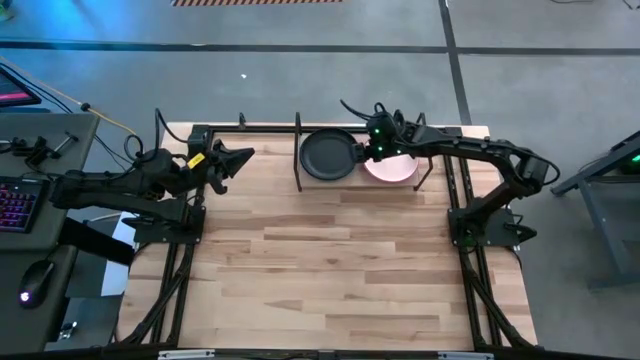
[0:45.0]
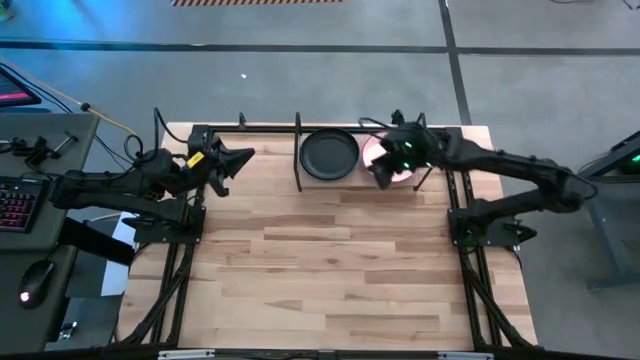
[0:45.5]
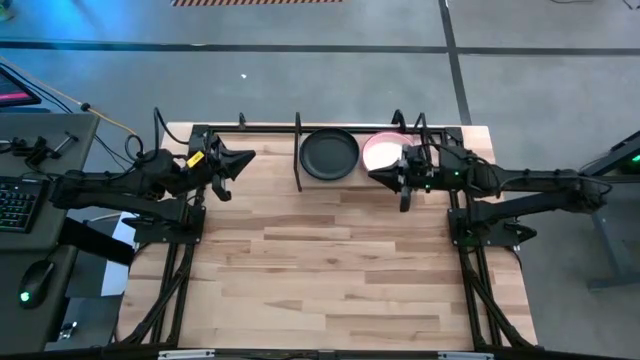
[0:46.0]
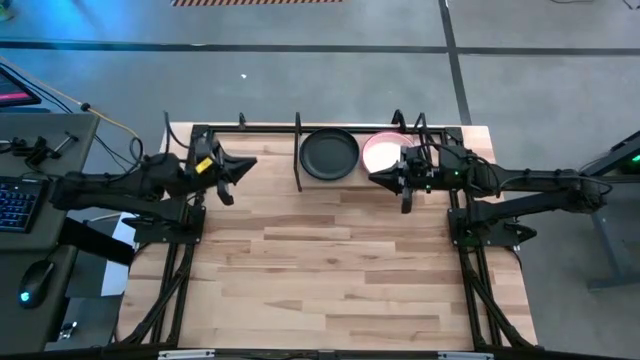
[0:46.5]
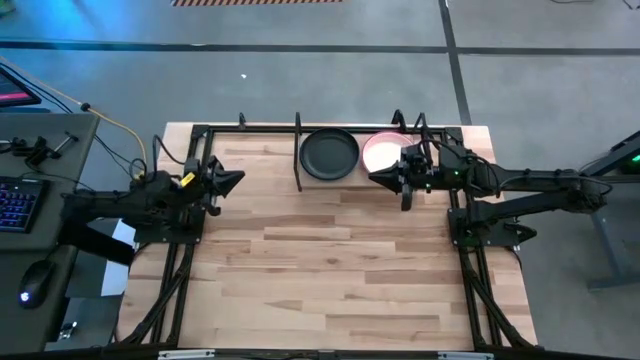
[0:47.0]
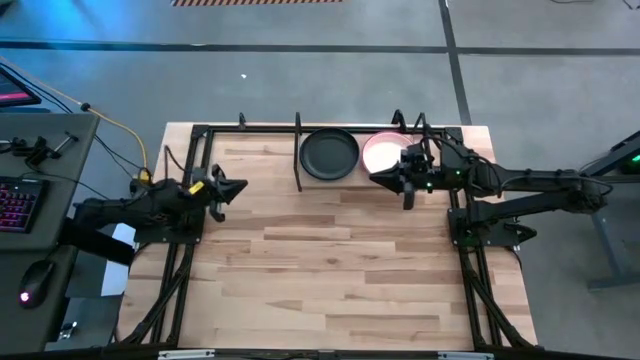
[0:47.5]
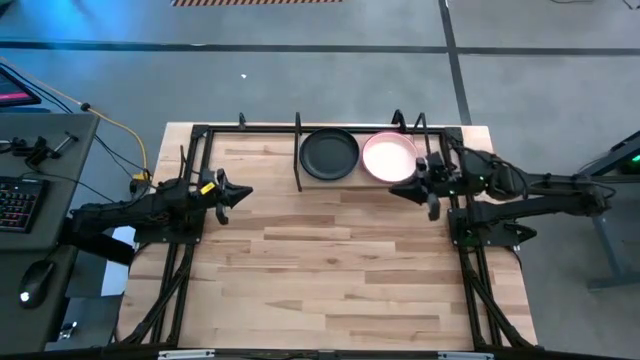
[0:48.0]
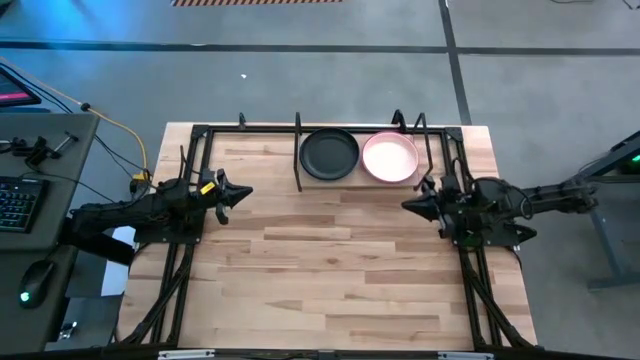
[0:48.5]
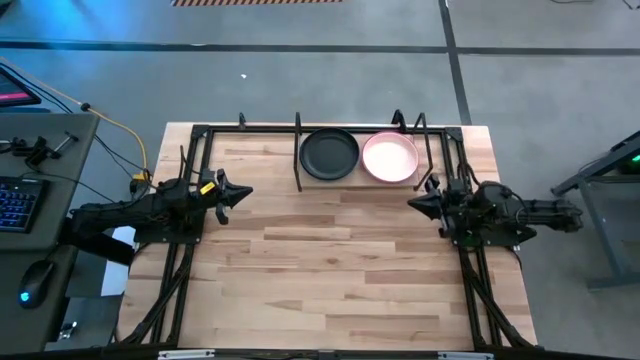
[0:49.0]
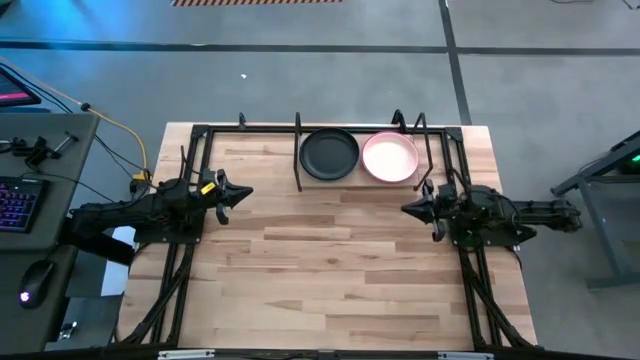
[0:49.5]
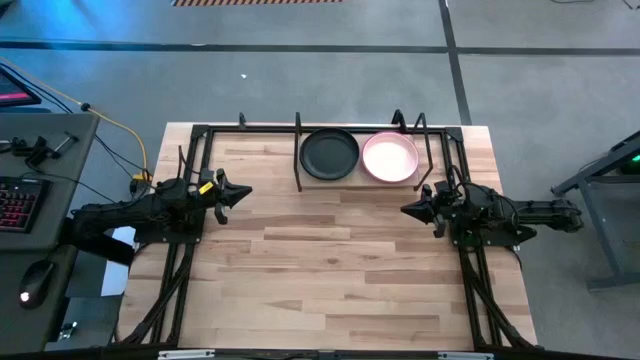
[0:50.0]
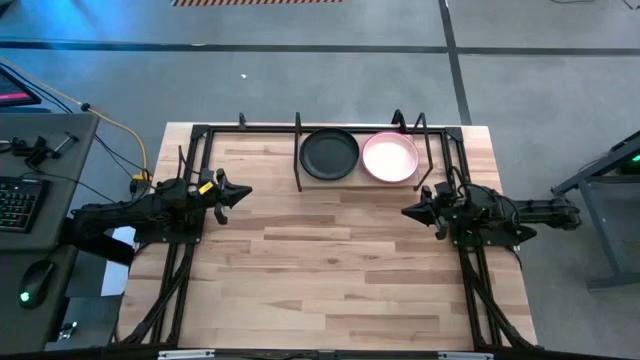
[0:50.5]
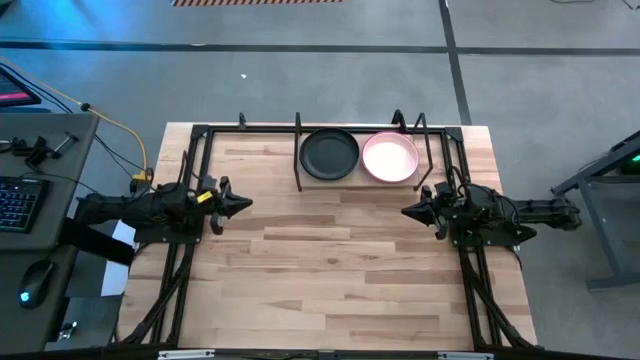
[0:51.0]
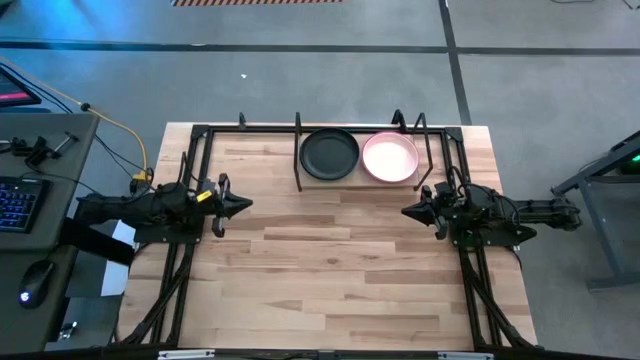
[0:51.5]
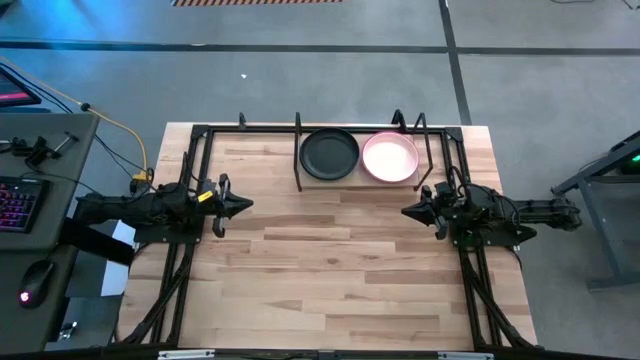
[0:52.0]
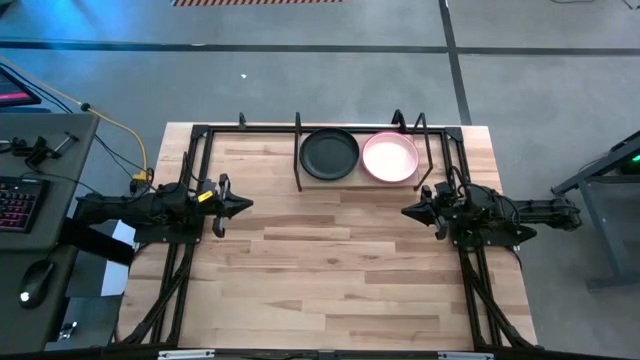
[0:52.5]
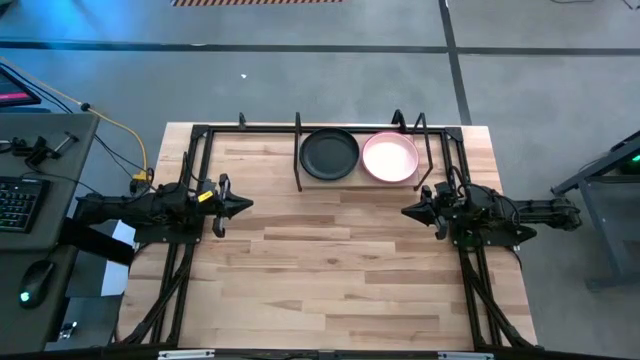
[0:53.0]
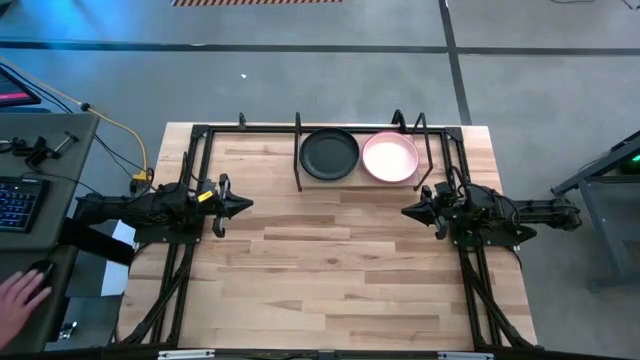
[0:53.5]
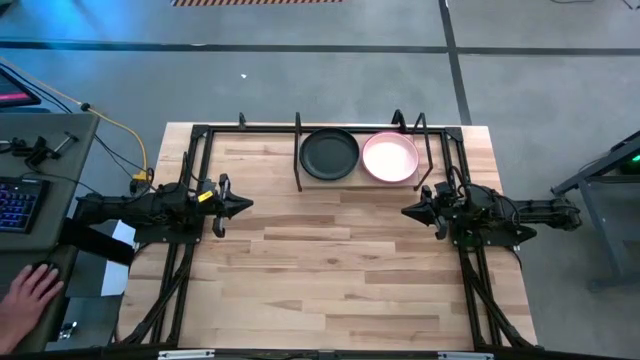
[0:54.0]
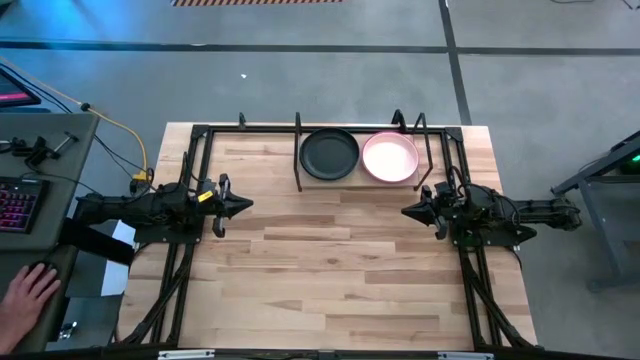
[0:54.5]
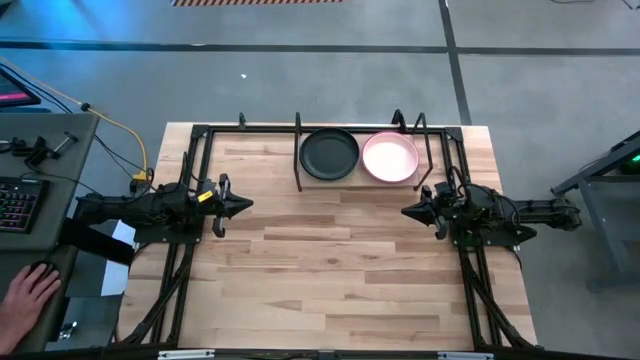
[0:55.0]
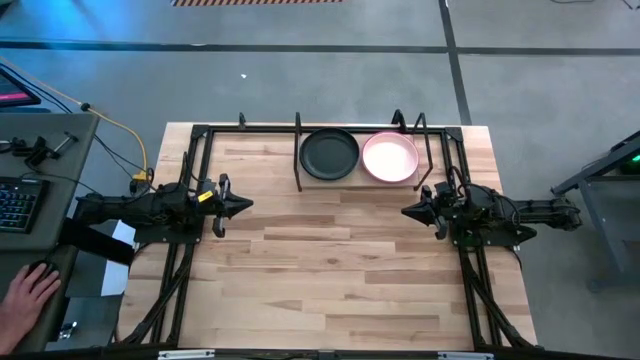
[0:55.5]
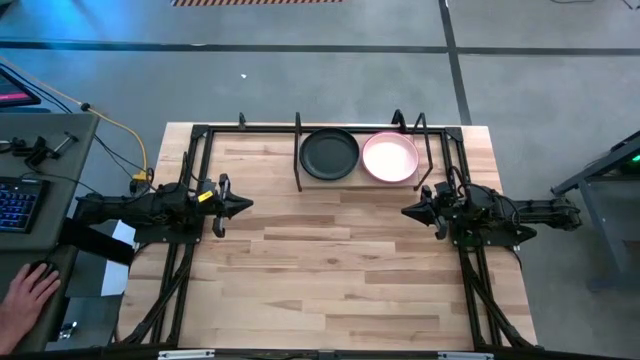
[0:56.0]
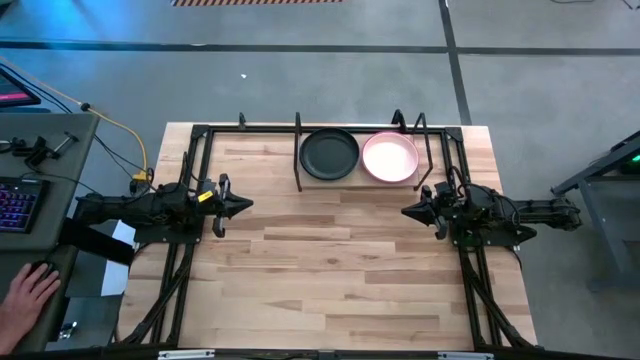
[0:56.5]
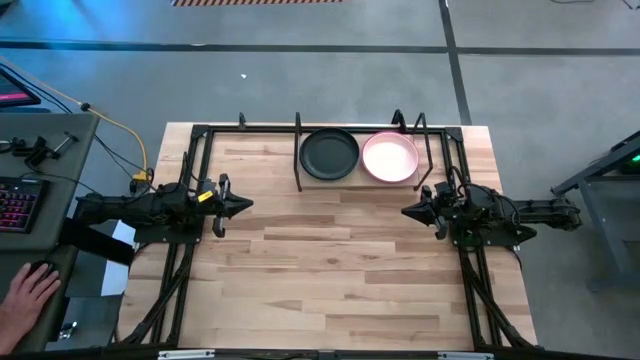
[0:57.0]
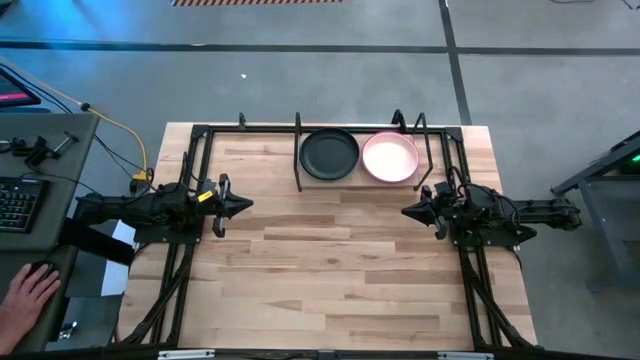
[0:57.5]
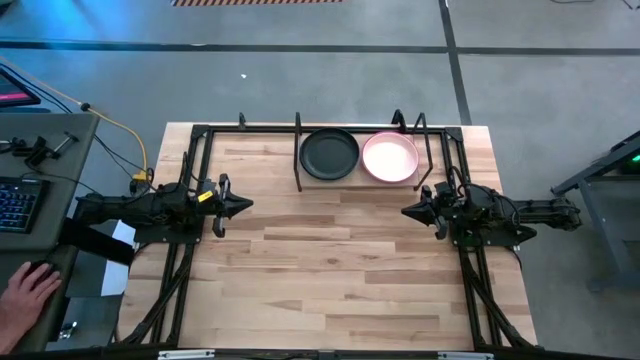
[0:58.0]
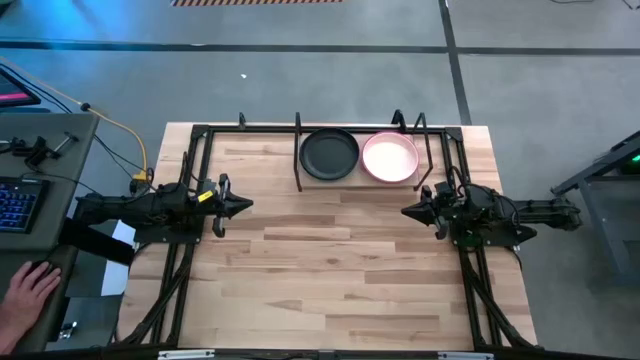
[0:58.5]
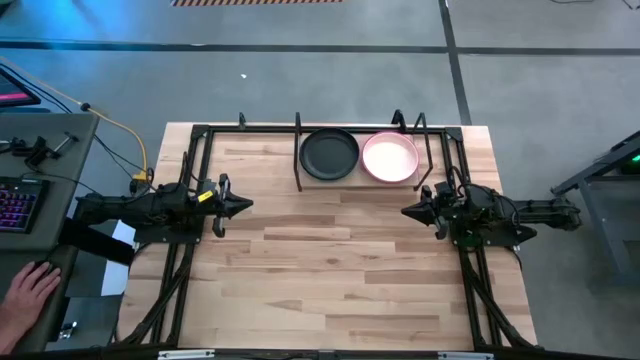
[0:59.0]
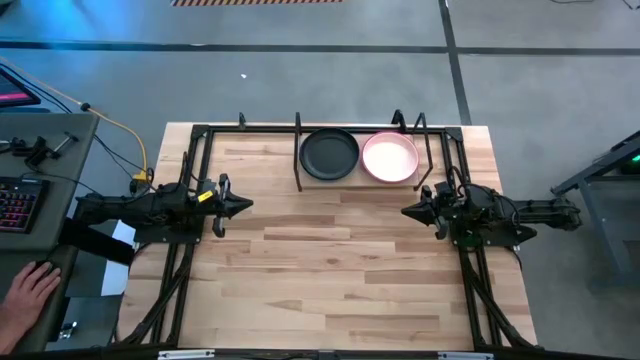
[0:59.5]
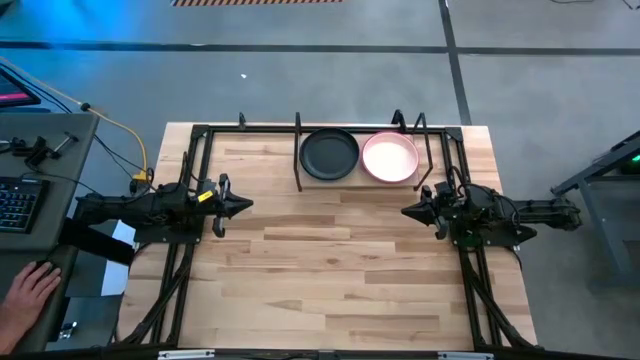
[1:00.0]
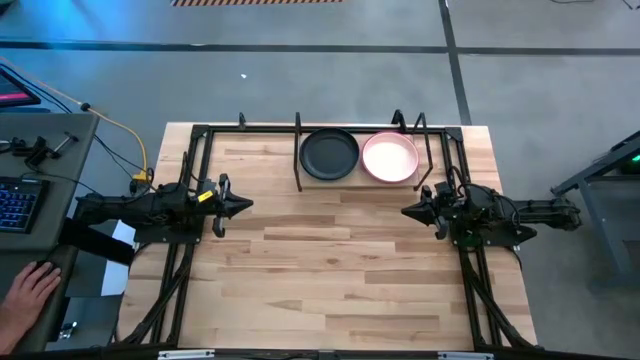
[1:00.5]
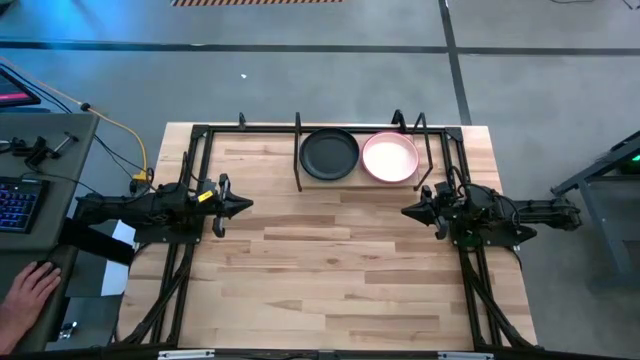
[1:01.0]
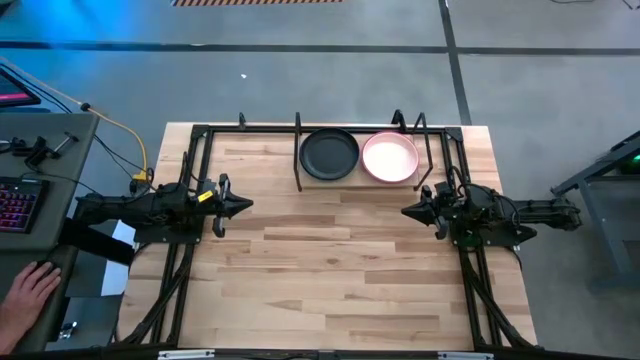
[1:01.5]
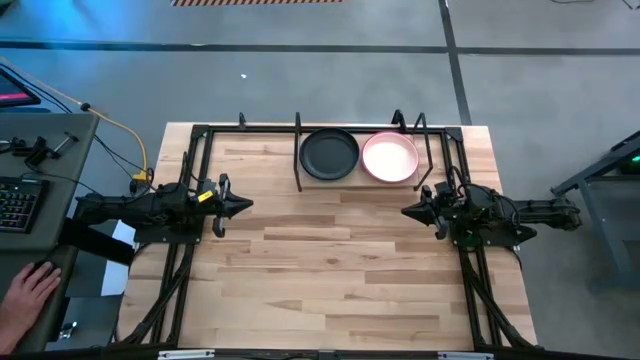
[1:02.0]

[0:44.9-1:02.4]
Task: Place and stack plates onto a shelf
Return to Home Position
